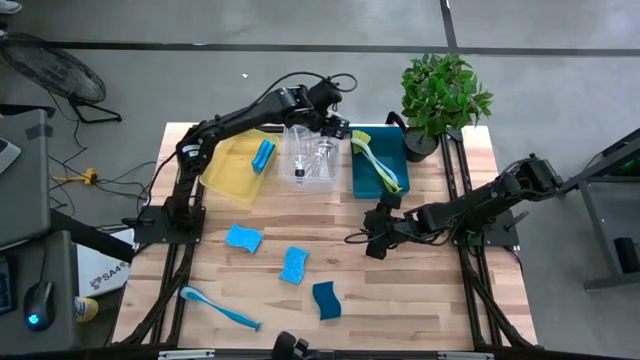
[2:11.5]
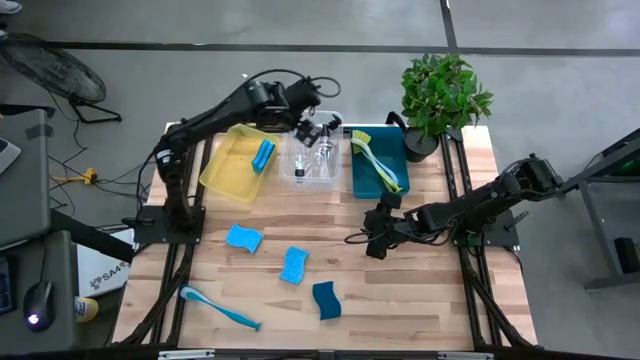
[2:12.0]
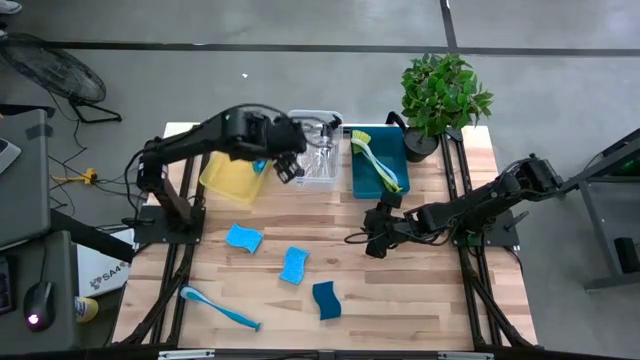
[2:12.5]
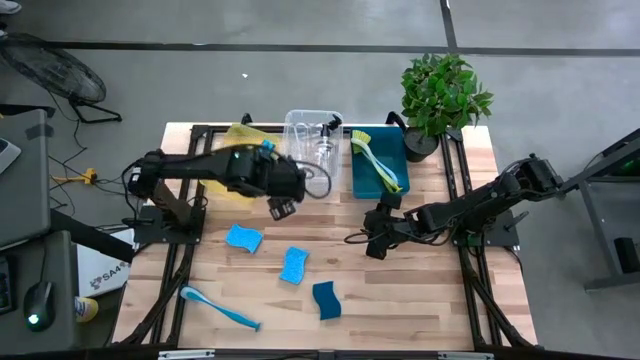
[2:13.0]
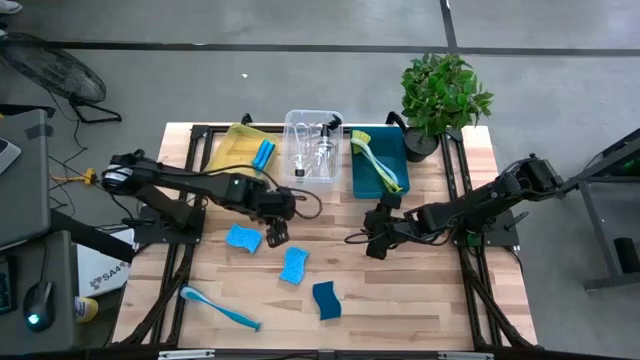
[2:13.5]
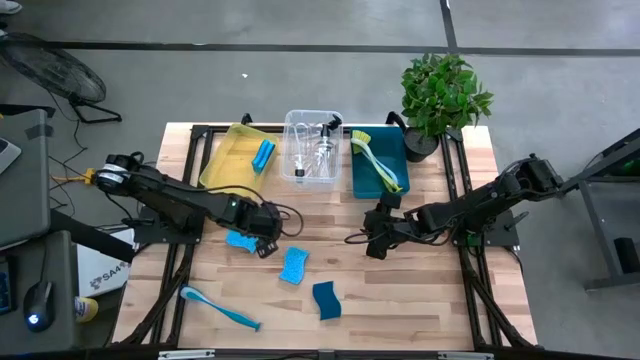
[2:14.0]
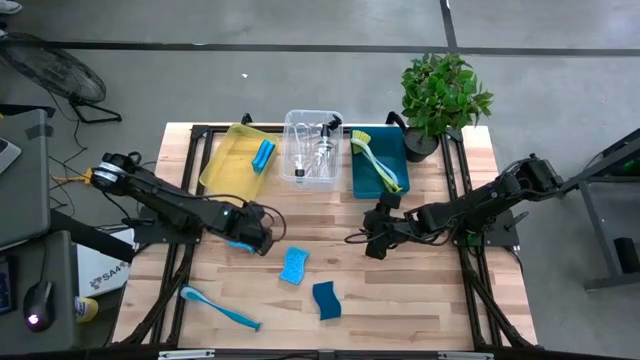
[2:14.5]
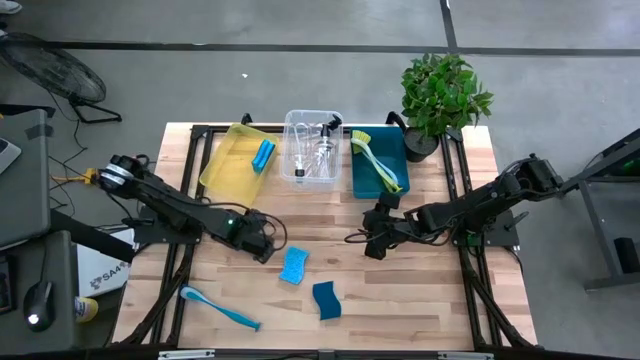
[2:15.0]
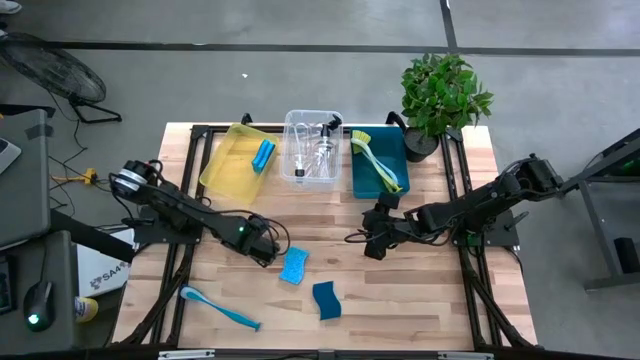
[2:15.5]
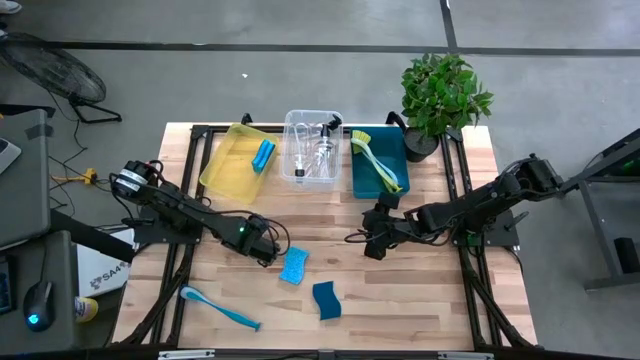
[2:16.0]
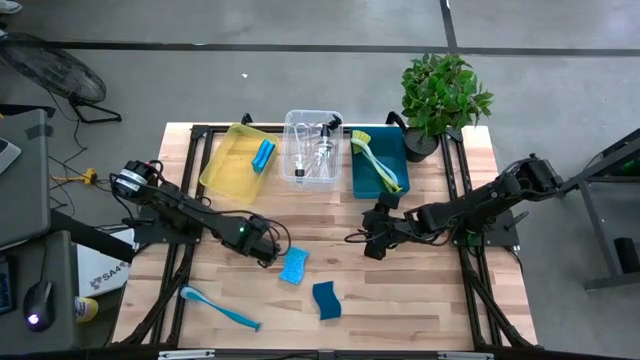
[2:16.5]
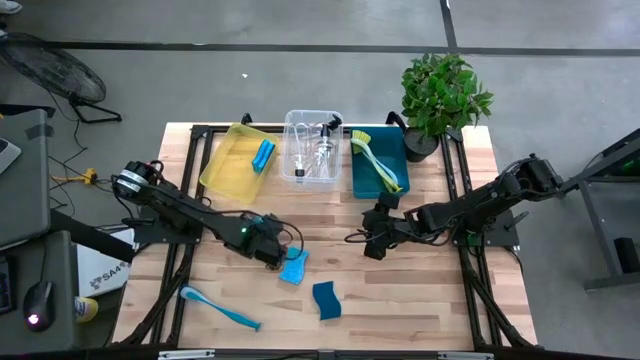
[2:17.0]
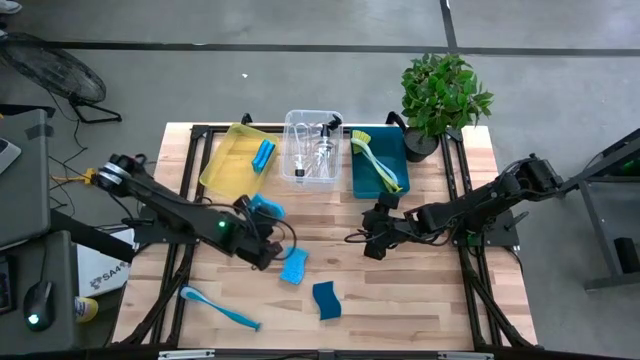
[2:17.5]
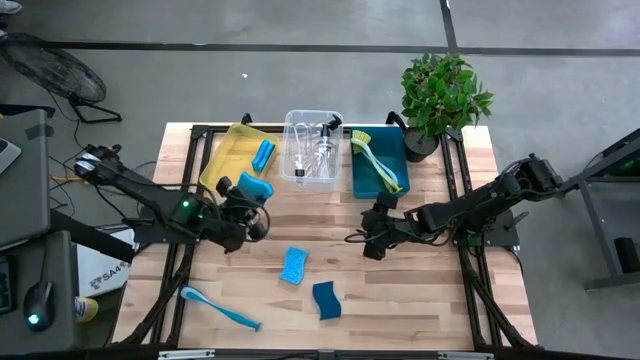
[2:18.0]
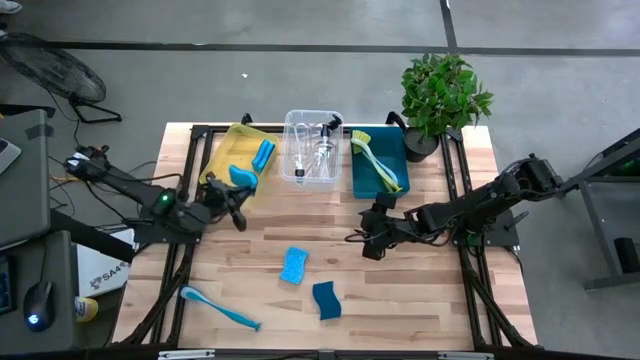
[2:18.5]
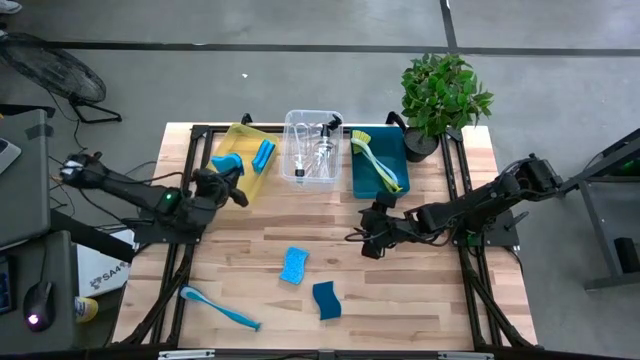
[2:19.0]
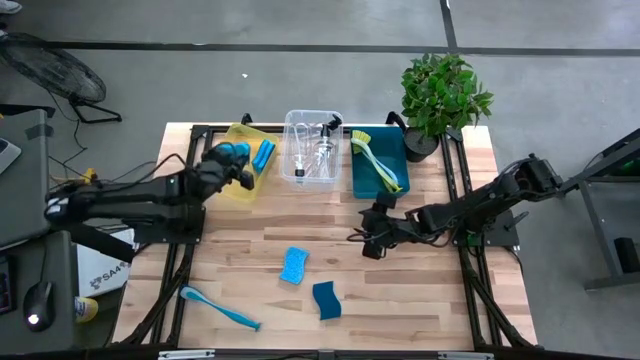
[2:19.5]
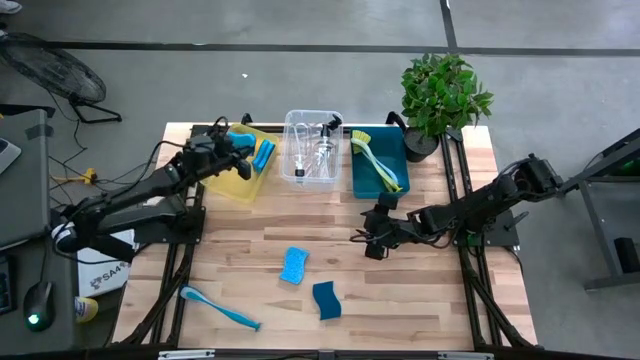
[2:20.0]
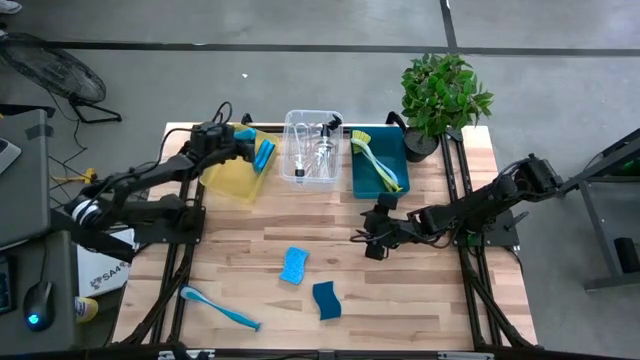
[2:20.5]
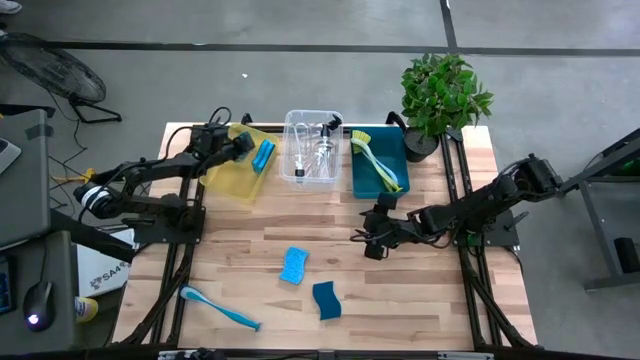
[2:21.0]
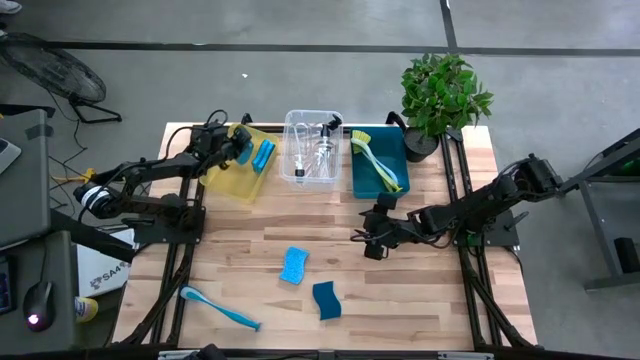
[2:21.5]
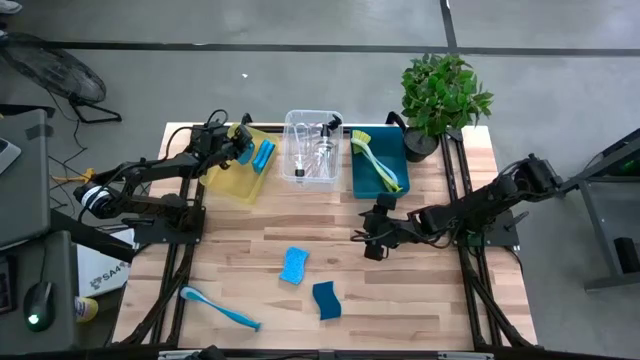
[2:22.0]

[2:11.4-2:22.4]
Task: Pick & Place Kitchen Sink Supplies
Put the blue sponge into the yellow bin

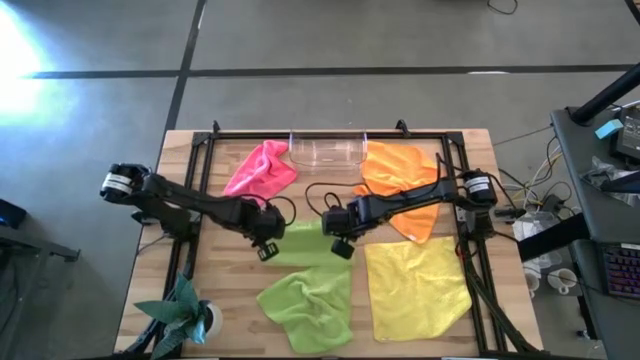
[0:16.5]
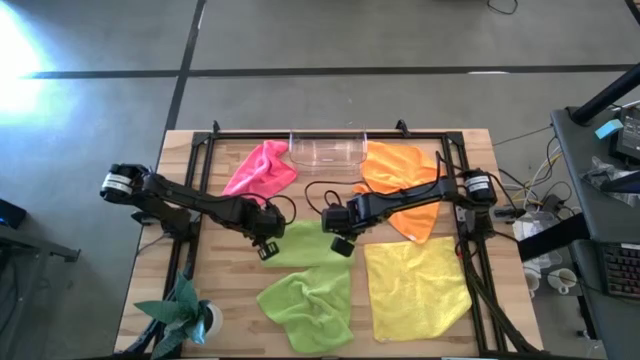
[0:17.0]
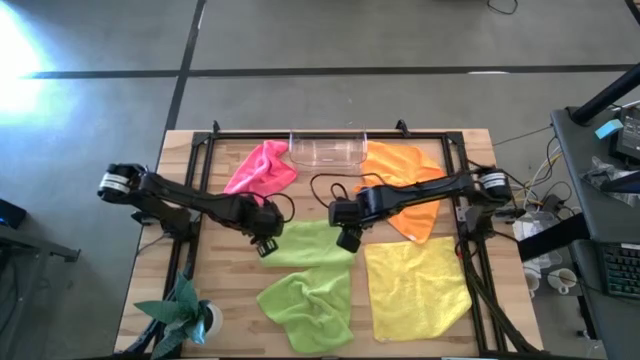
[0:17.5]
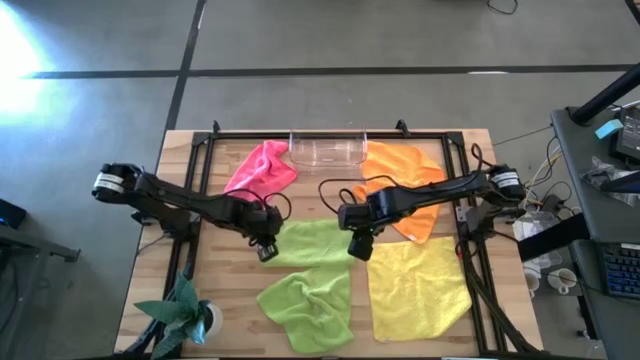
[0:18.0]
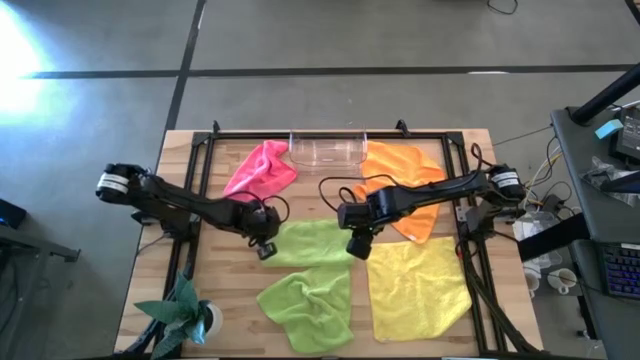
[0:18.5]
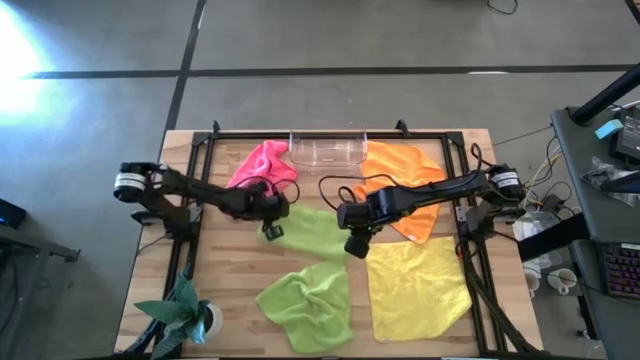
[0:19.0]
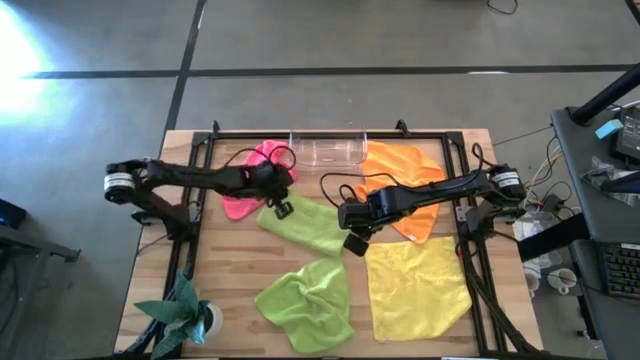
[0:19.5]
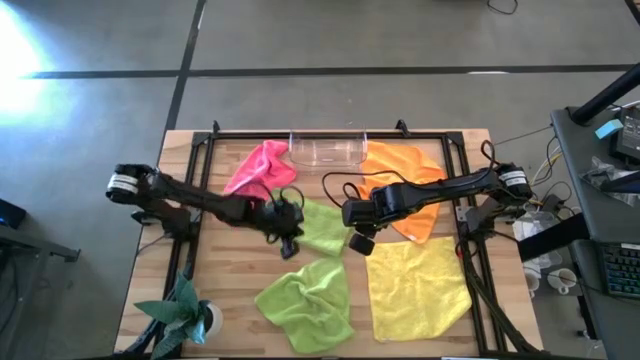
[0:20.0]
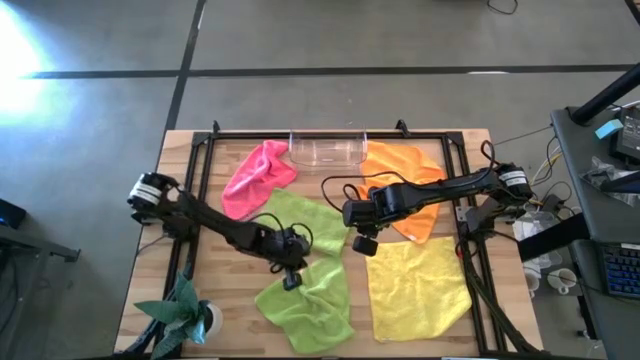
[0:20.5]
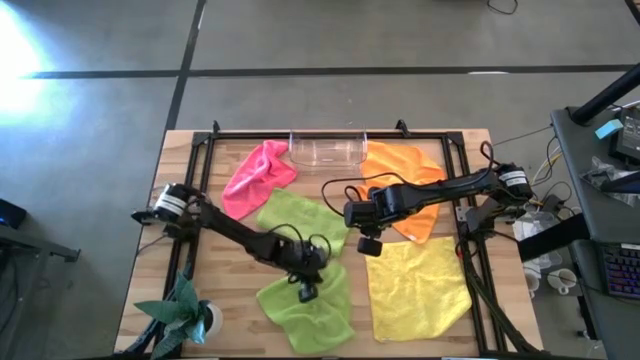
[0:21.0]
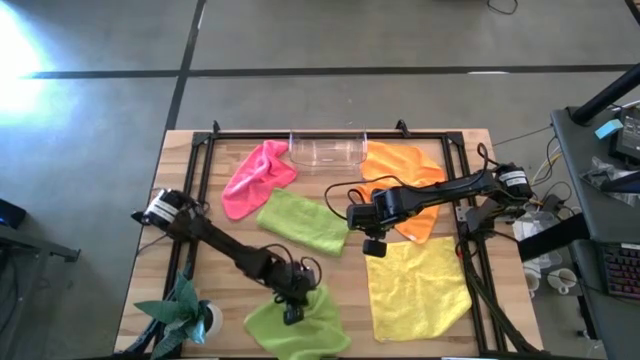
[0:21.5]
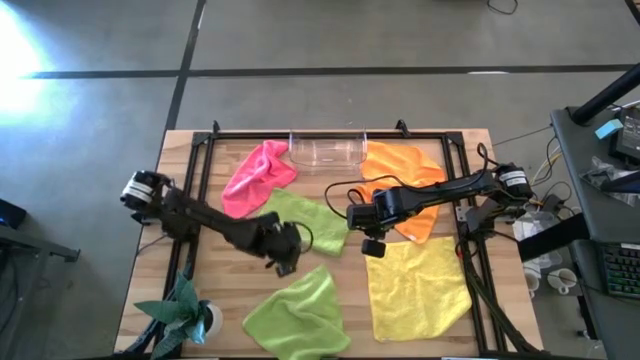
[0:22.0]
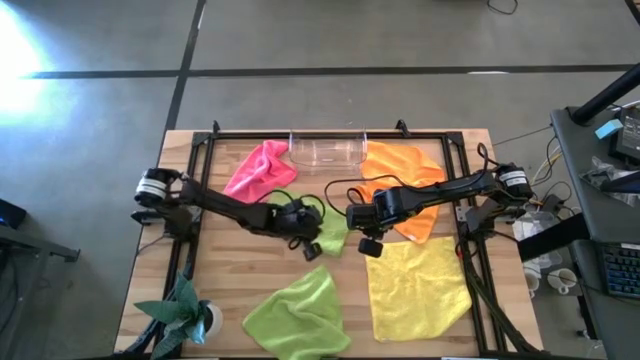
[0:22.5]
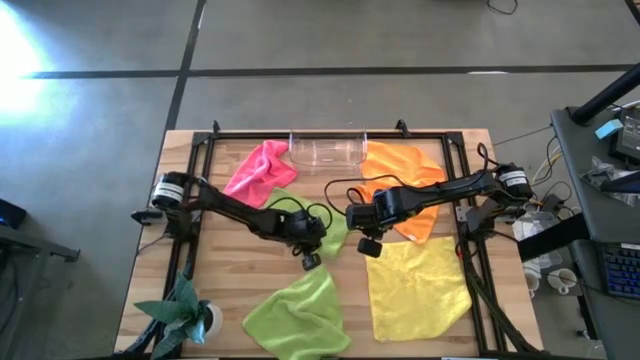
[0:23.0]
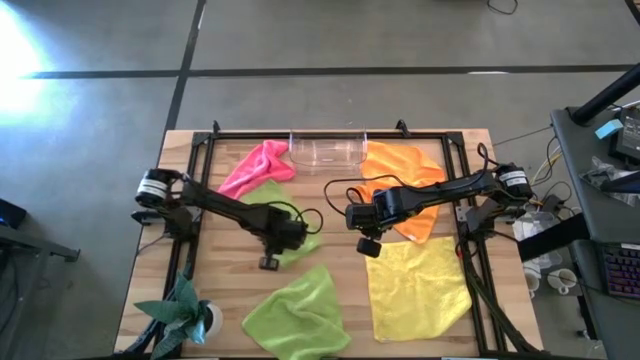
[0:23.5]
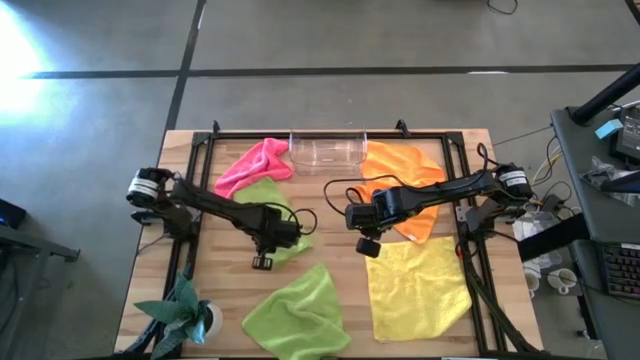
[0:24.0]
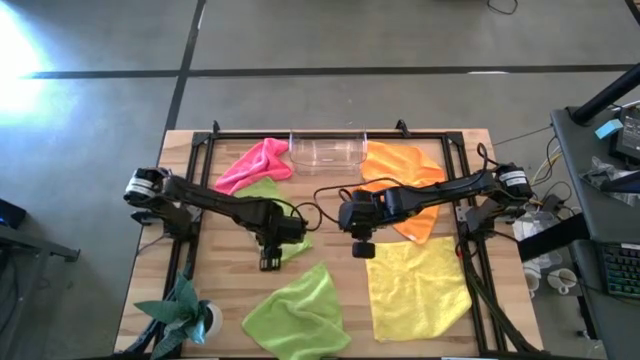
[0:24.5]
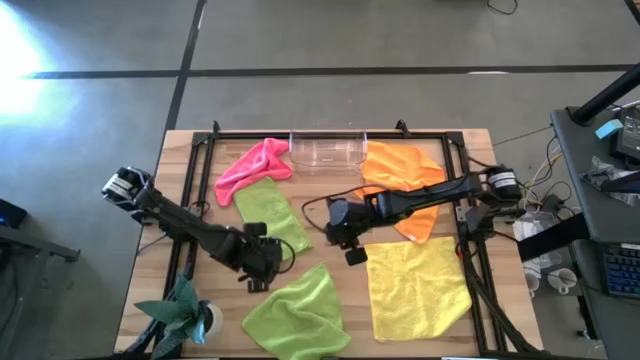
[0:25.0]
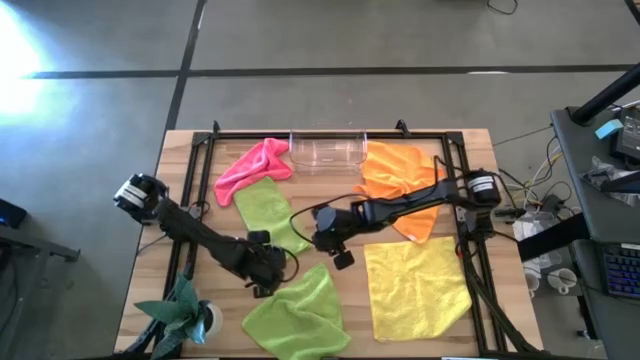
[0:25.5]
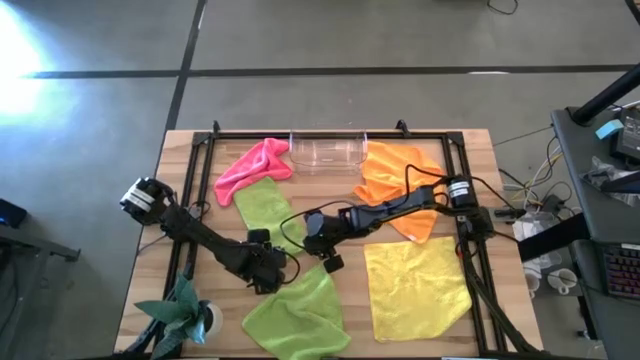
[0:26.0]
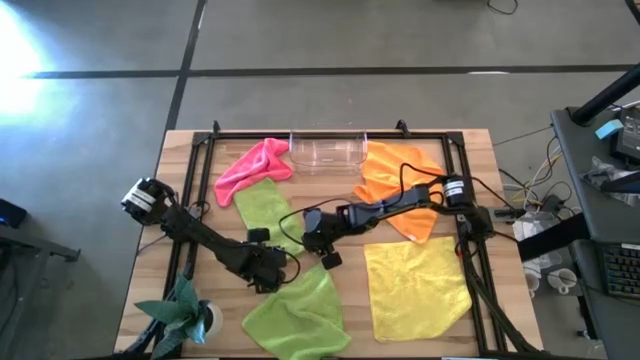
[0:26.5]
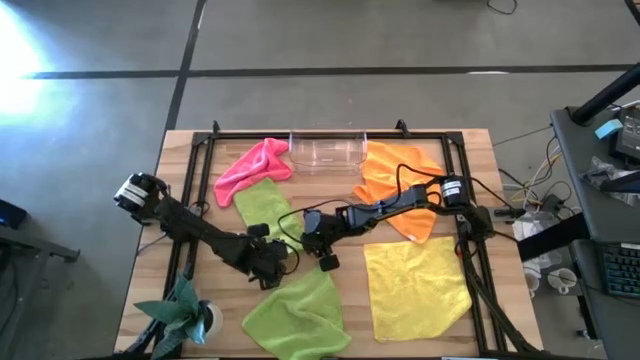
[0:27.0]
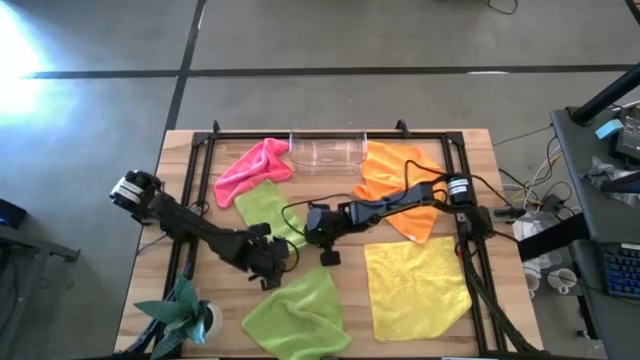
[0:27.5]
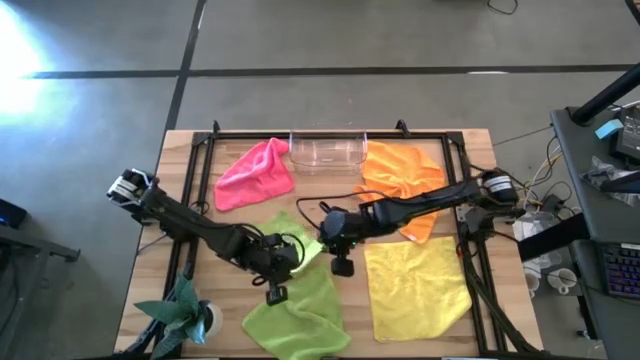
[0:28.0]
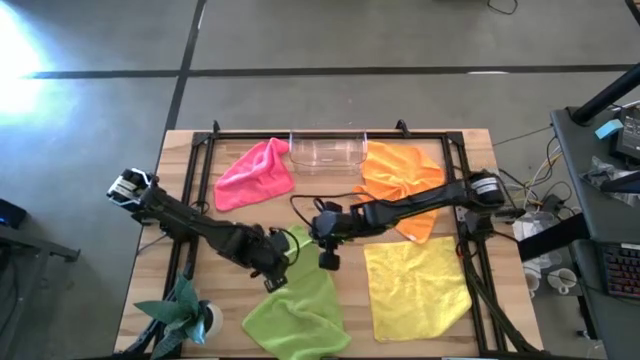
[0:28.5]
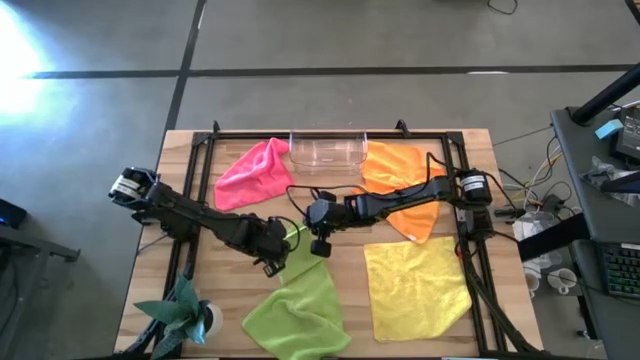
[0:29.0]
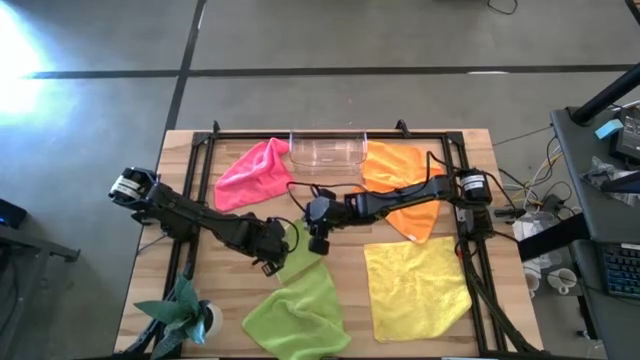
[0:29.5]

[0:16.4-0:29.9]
Task: Fold microfiber towels
Fold the top green microfiber towel
